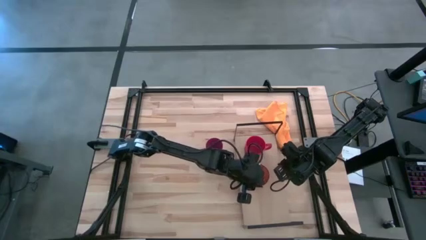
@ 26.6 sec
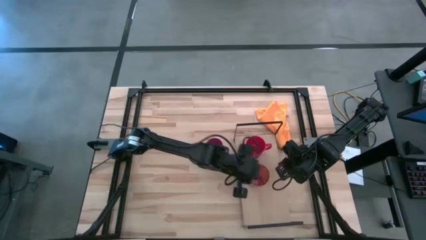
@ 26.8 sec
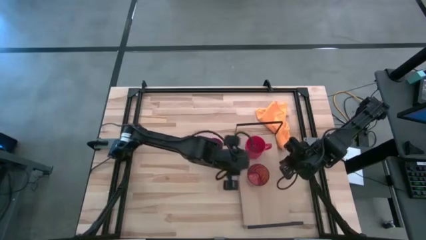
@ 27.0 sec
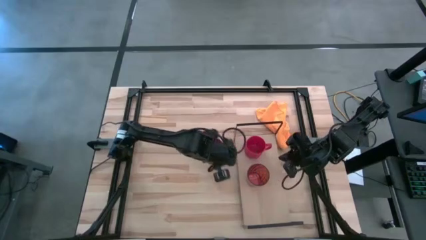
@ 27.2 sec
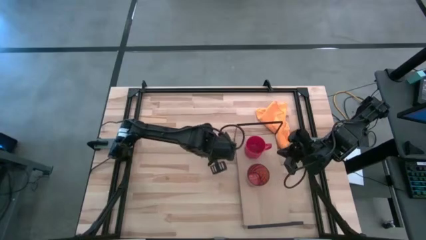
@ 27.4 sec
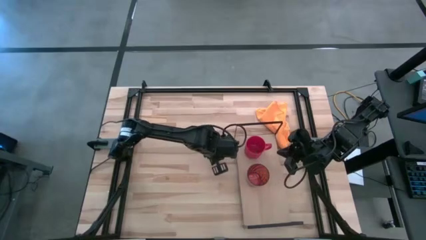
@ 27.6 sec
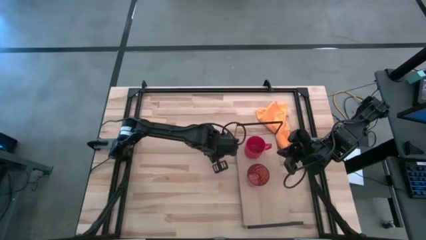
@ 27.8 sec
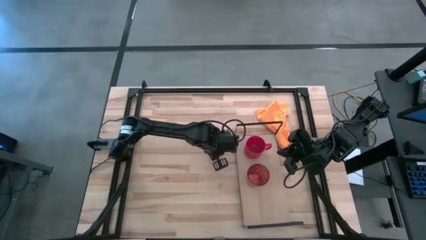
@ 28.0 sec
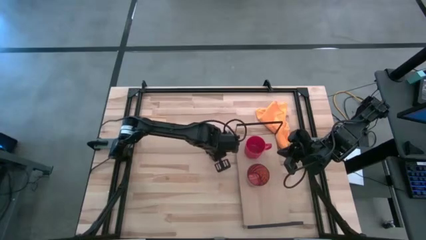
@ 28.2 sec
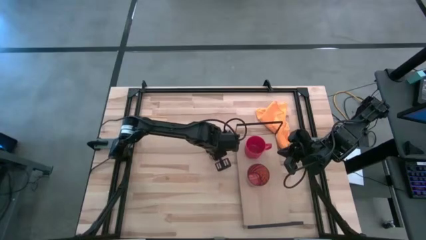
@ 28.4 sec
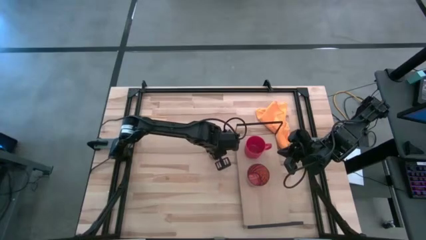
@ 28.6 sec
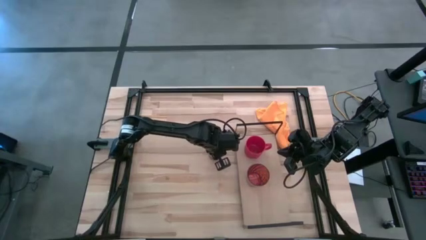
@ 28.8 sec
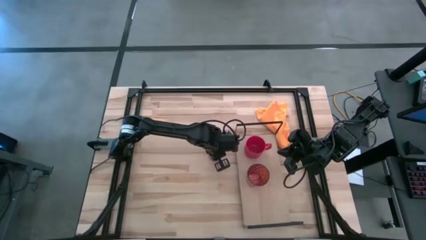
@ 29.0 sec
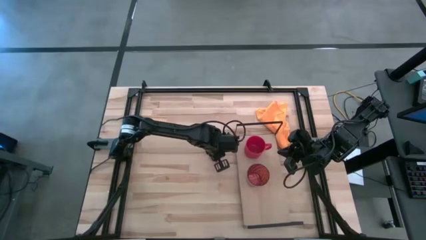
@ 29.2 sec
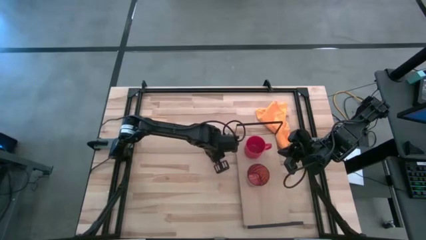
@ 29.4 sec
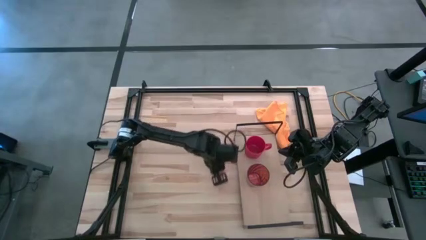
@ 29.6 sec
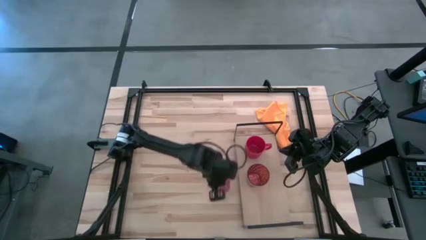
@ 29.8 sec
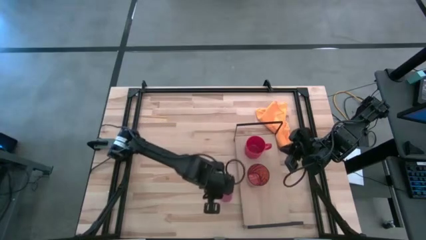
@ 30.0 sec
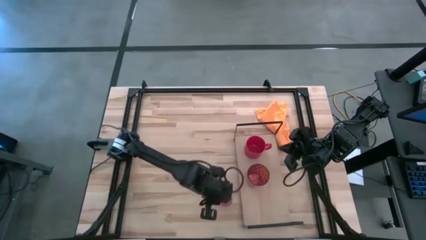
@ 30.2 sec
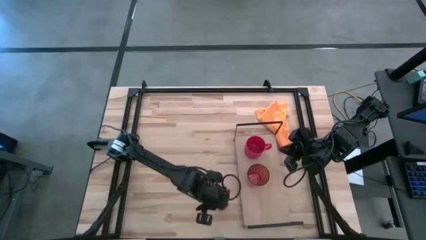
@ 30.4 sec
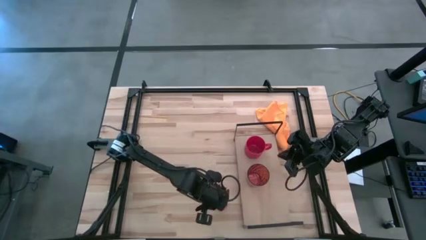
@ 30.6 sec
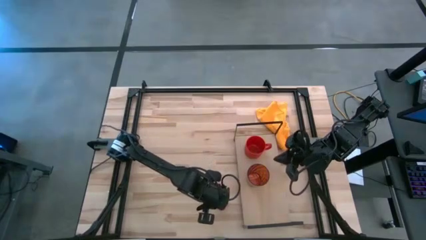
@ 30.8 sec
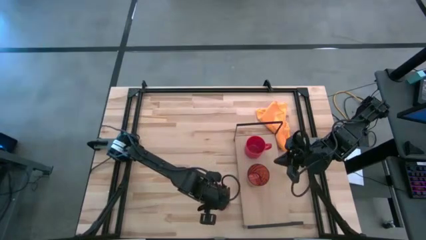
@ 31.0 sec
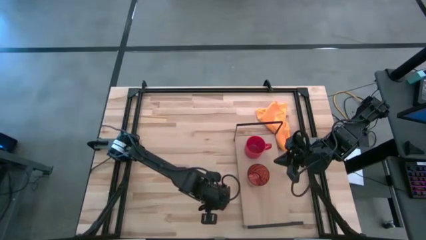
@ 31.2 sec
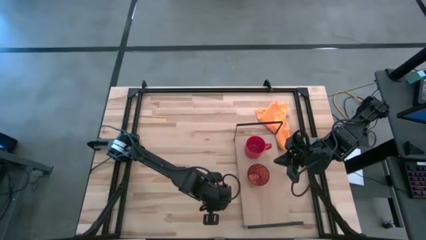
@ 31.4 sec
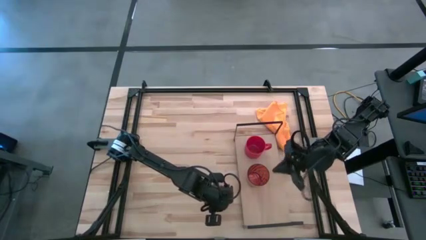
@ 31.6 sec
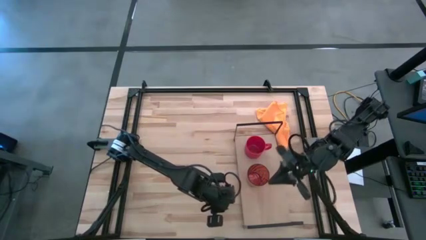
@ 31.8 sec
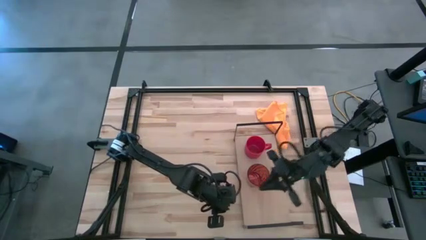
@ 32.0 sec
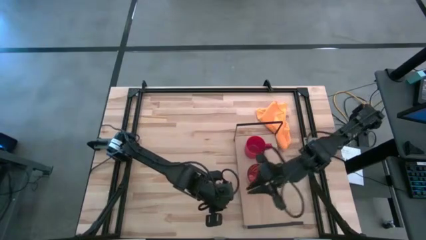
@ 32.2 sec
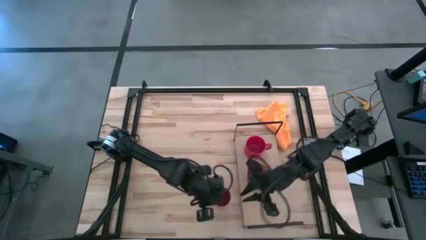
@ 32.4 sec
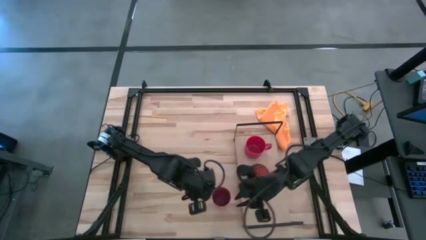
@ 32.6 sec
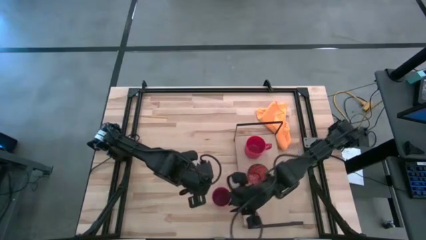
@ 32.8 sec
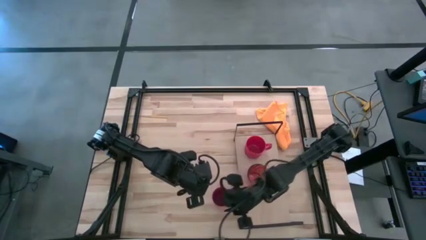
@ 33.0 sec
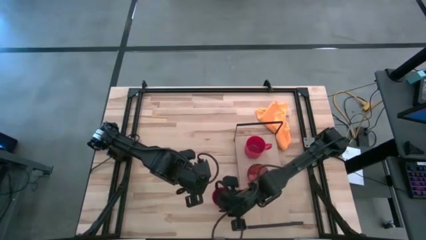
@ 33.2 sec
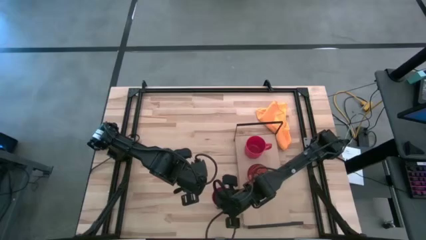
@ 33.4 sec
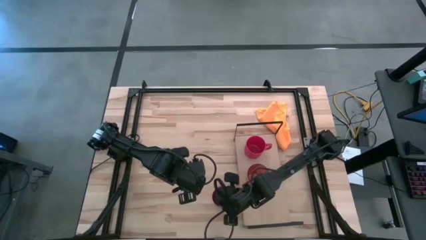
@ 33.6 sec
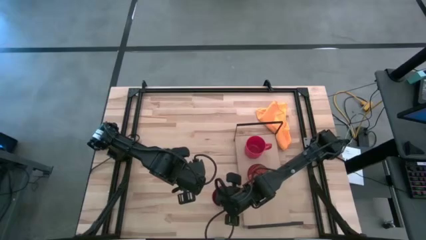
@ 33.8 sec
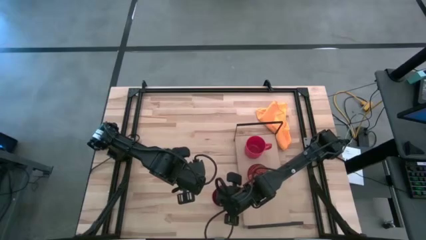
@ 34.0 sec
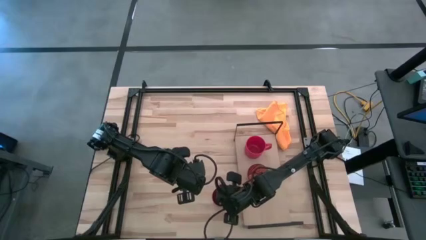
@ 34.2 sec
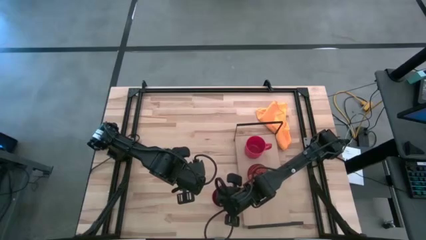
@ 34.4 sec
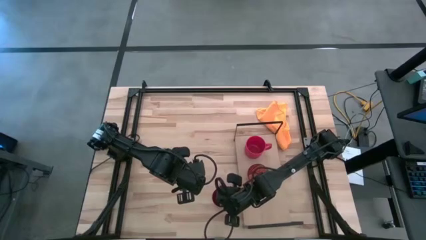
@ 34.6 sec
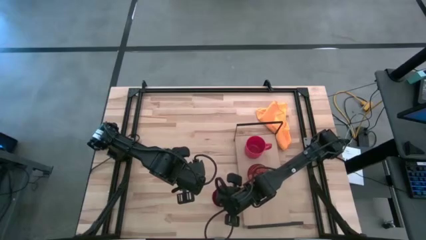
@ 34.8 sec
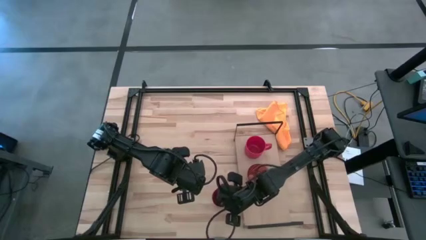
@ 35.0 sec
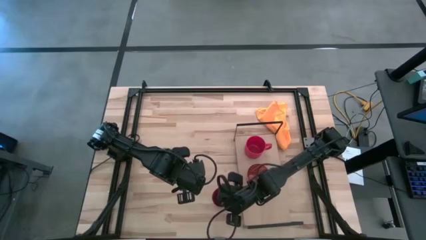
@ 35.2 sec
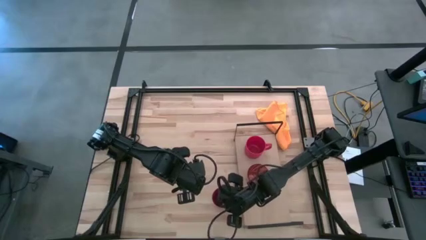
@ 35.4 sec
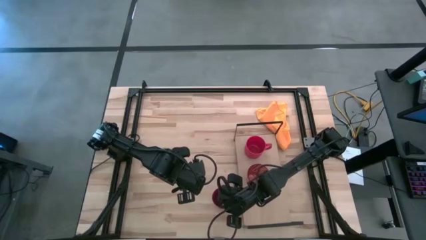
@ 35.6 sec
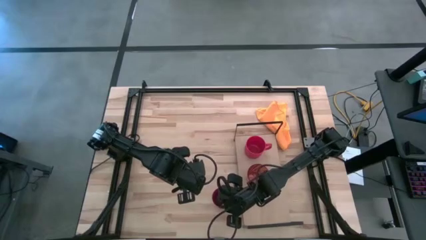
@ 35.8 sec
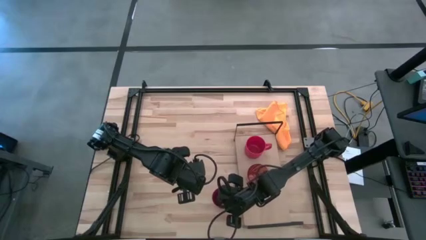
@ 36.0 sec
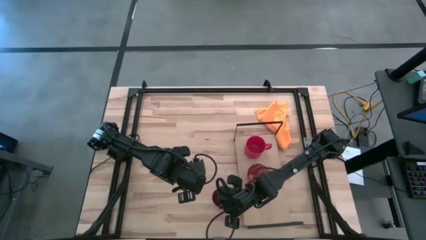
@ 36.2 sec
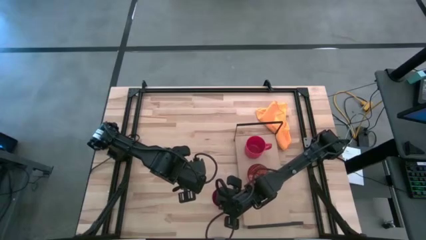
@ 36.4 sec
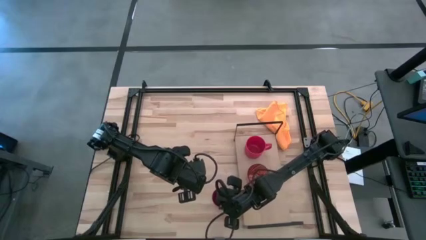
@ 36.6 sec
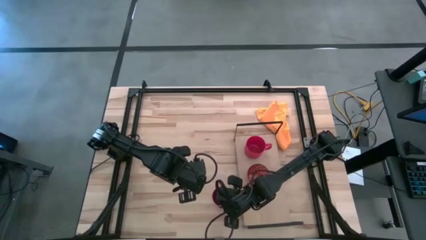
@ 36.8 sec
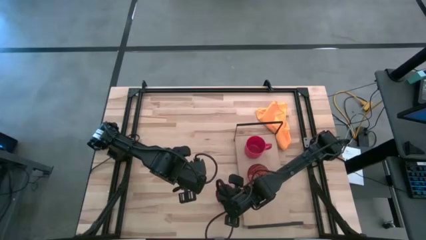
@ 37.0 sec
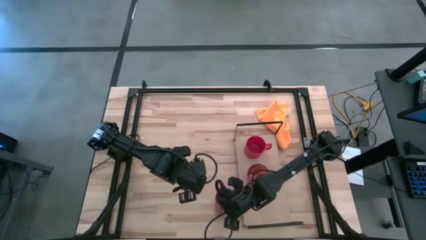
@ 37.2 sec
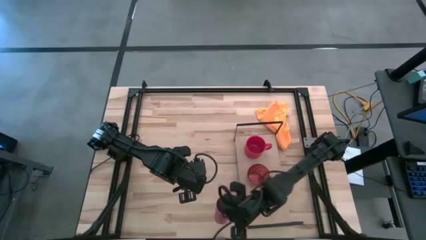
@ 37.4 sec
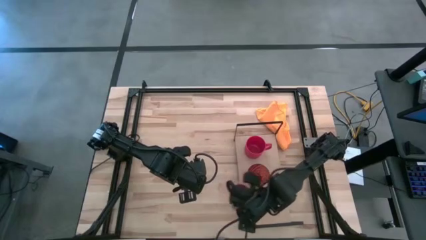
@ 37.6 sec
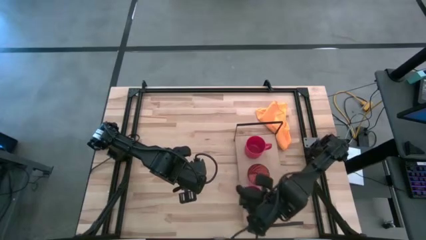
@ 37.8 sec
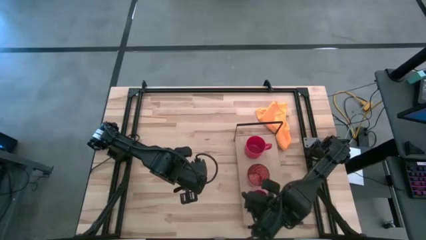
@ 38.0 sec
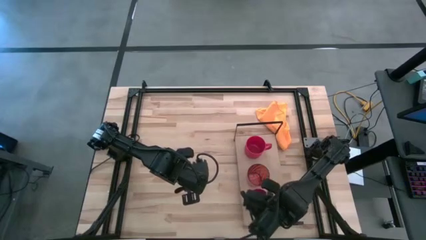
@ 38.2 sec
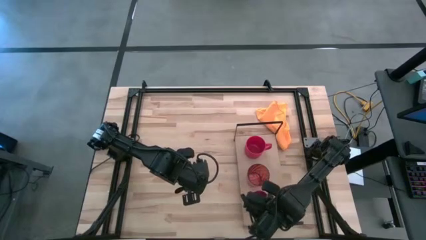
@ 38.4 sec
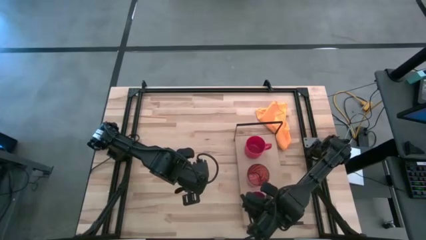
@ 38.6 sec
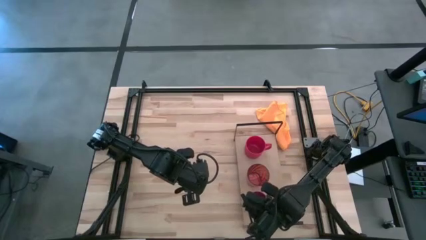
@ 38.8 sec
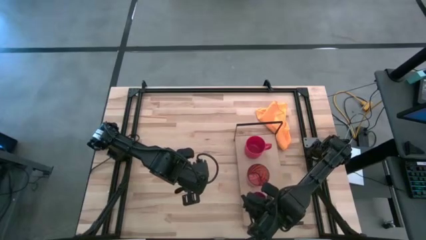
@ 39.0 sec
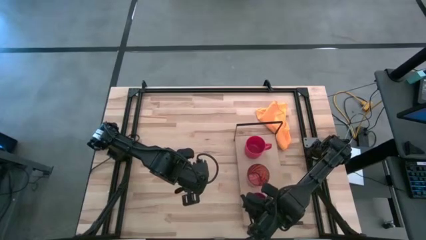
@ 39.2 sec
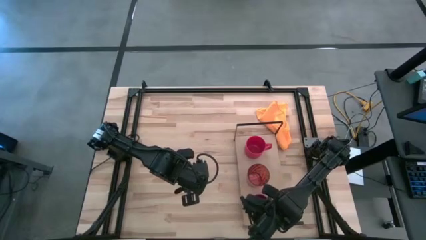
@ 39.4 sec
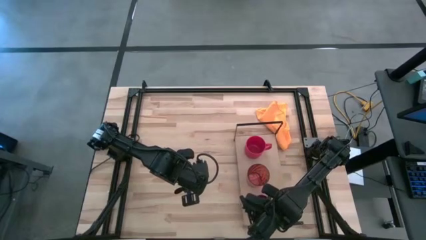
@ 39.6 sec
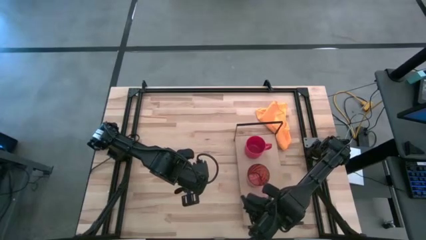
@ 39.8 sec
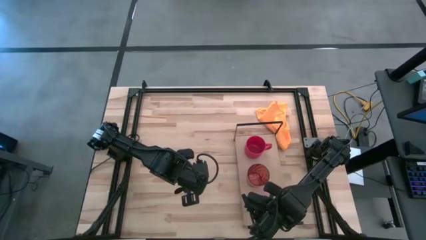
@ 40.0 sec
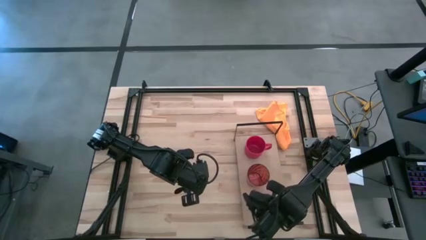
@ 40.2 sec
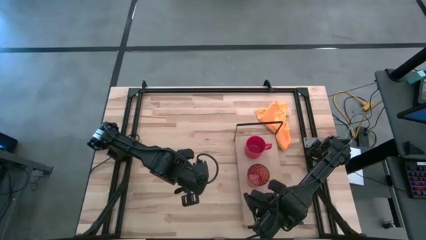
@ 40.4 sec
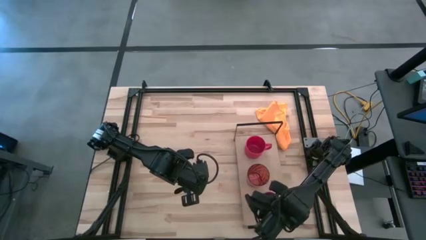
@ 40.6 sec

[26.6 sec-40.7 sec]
Task: Stack small to large cups/mugs on shelf
Put the pink cup on the shelf

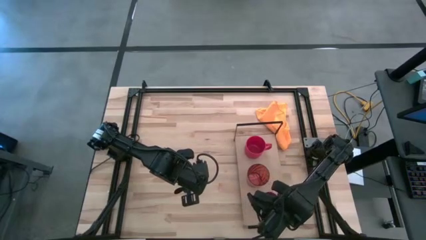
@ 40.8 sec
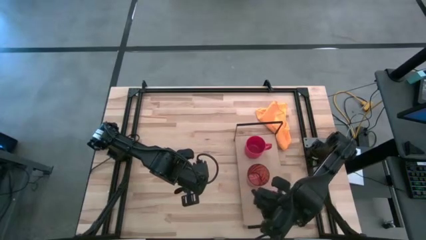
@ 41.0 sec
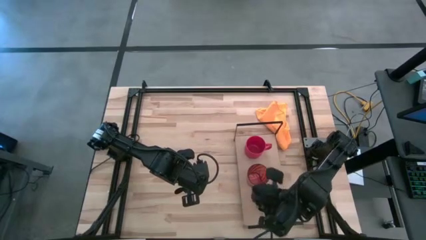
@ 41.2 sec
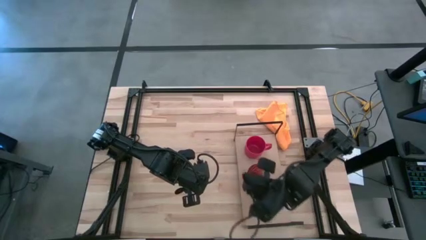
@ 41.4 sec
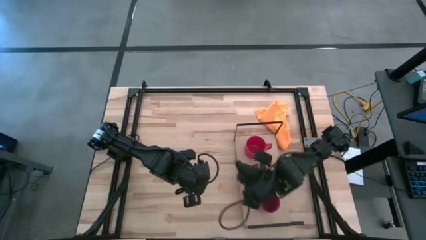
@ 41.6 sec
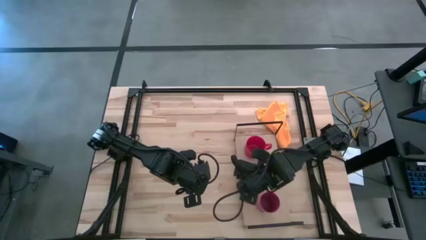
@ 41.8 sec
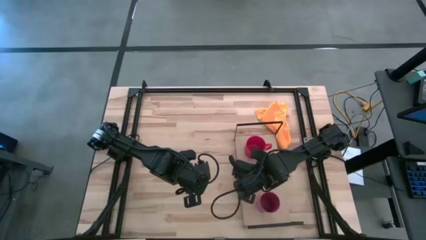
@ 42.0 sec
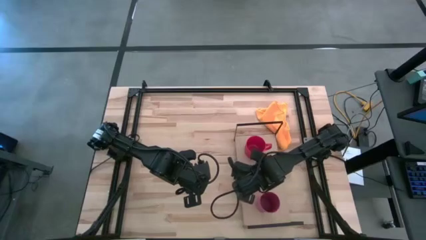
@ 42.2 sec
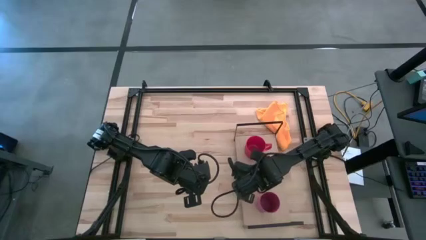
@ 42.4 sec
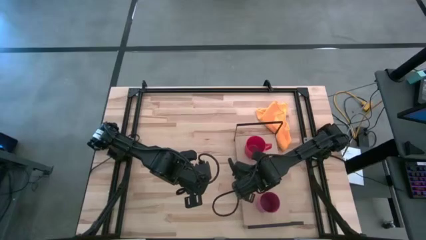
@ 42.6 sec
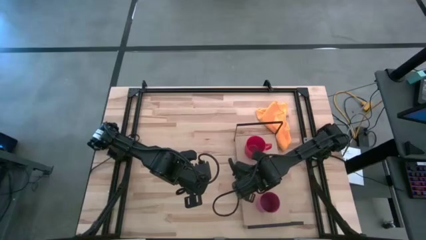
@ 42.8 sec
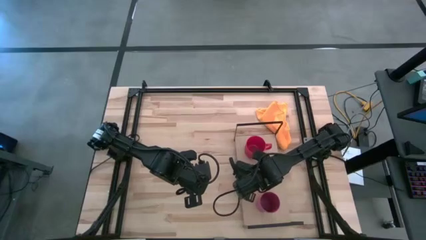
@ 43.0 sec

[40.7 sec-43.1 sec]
Adjust the brown cup
